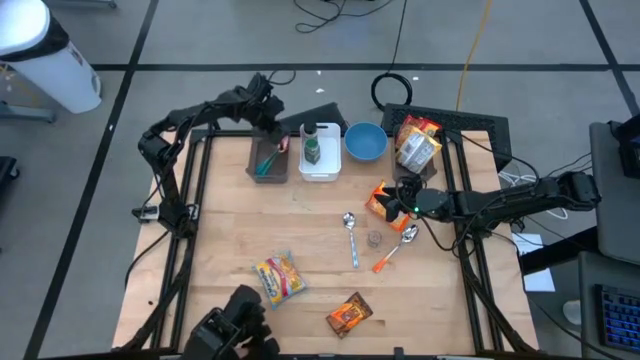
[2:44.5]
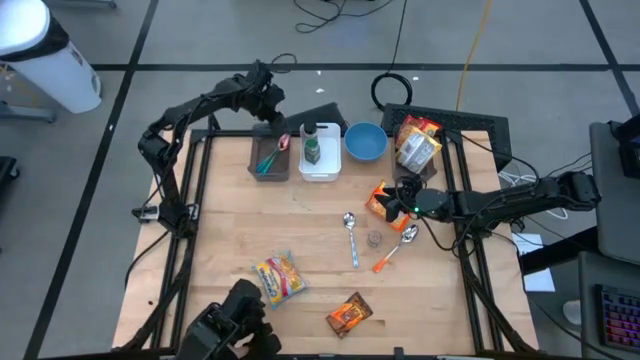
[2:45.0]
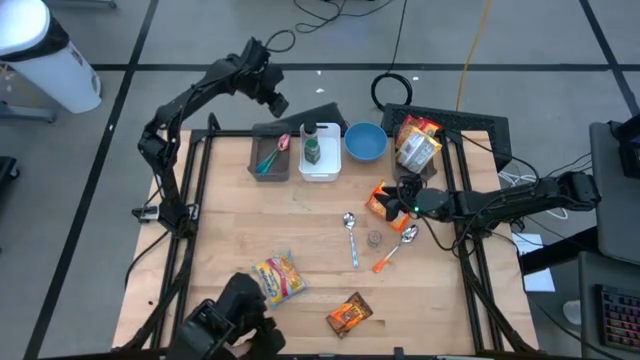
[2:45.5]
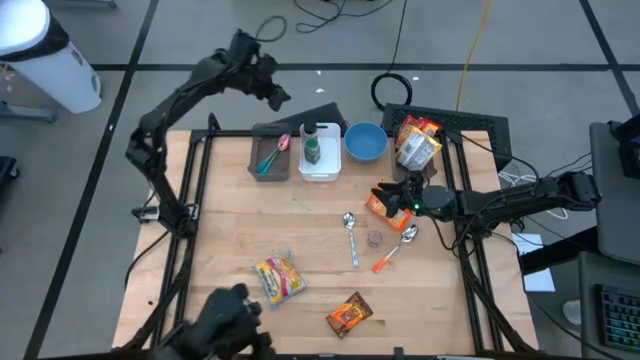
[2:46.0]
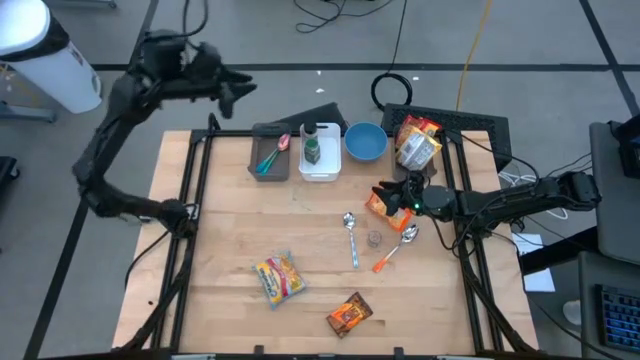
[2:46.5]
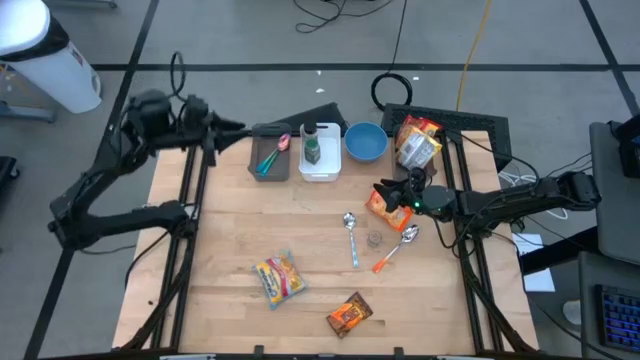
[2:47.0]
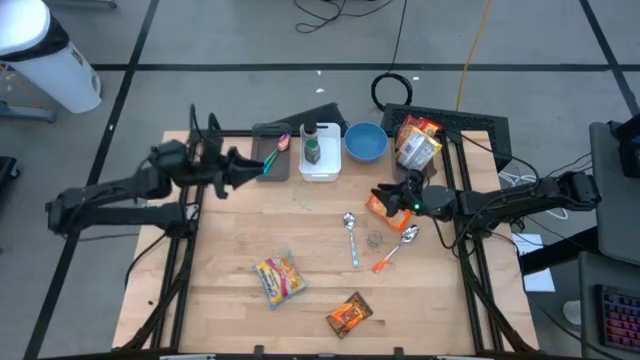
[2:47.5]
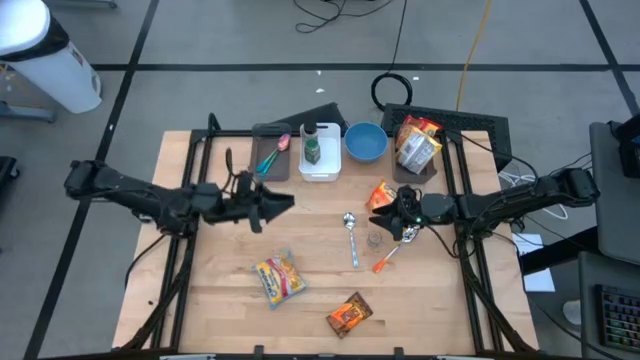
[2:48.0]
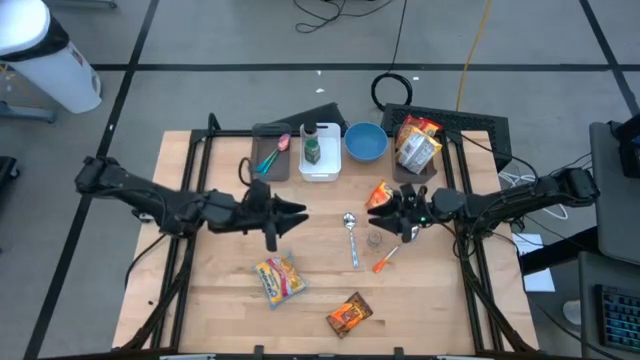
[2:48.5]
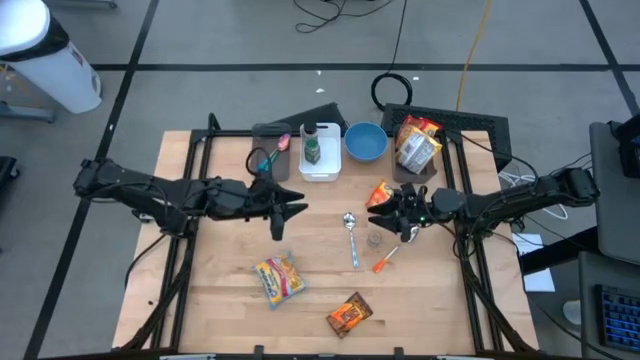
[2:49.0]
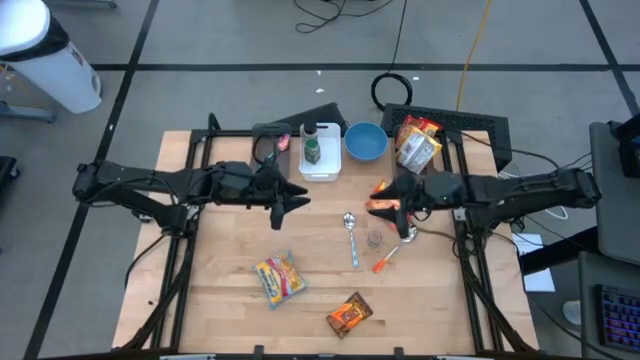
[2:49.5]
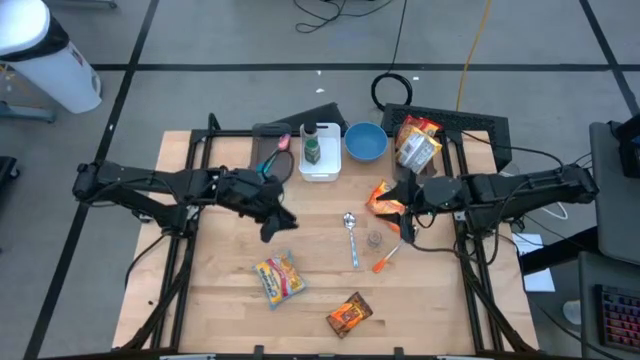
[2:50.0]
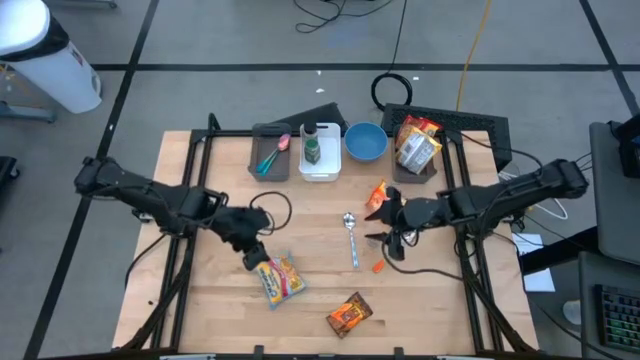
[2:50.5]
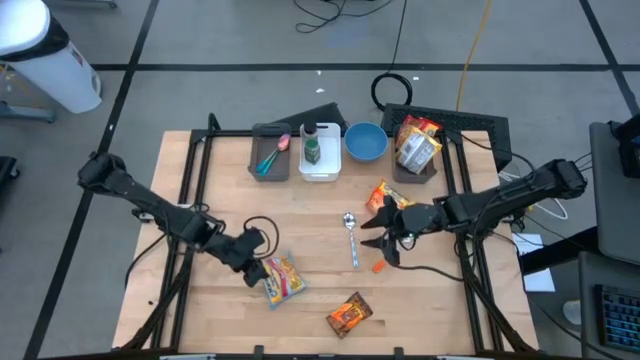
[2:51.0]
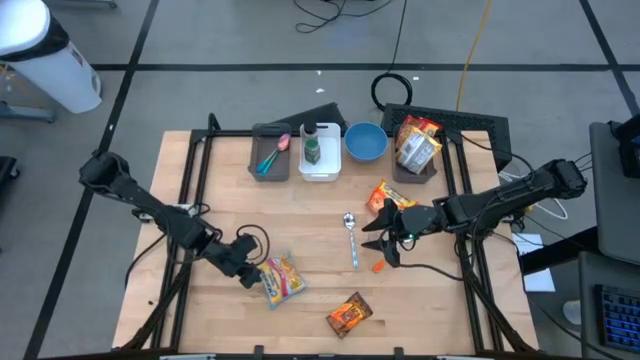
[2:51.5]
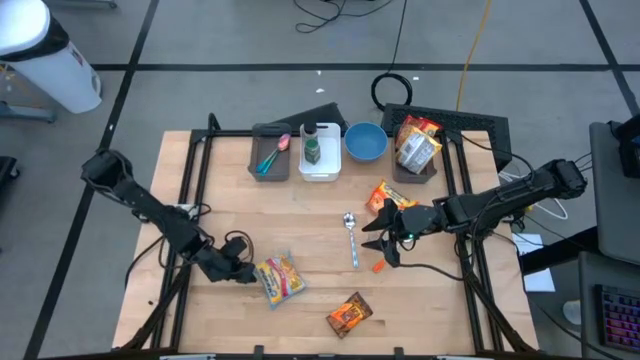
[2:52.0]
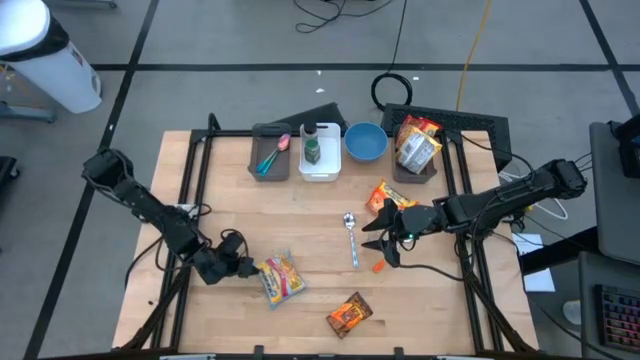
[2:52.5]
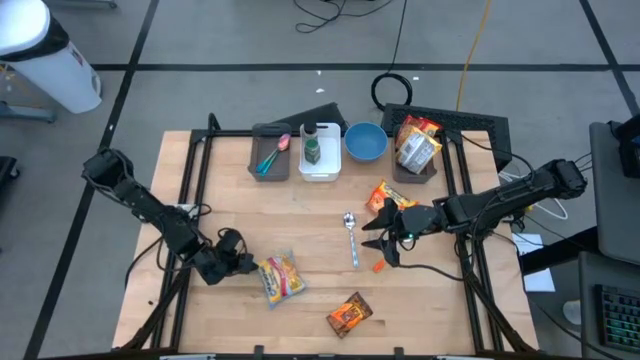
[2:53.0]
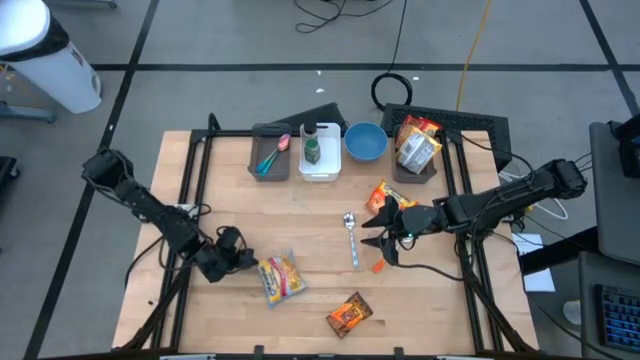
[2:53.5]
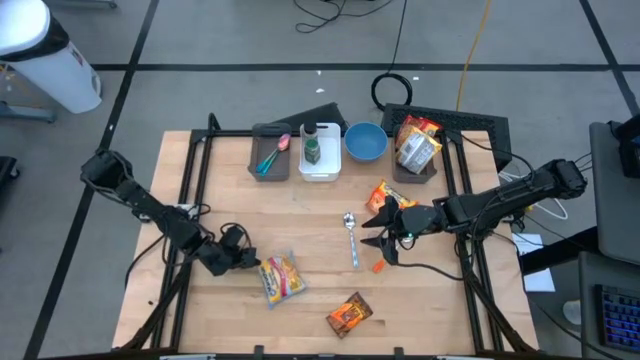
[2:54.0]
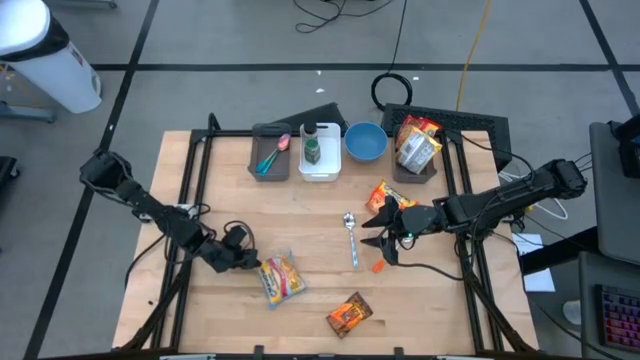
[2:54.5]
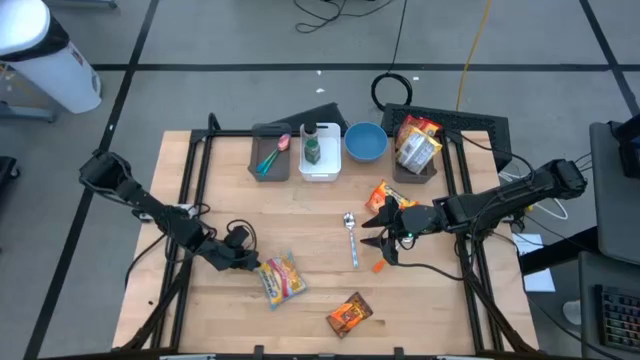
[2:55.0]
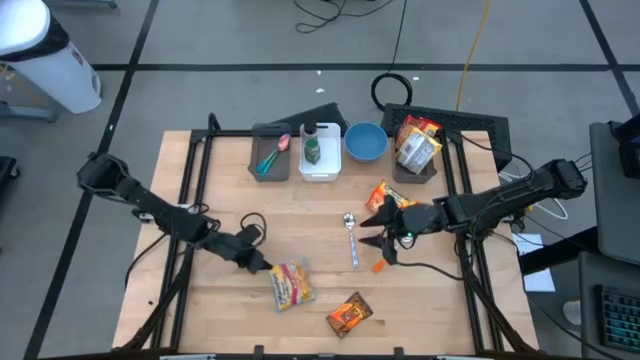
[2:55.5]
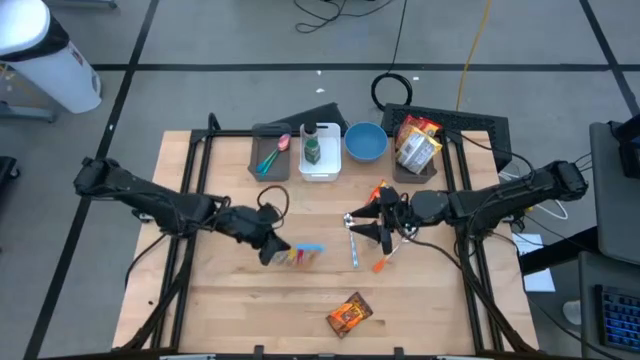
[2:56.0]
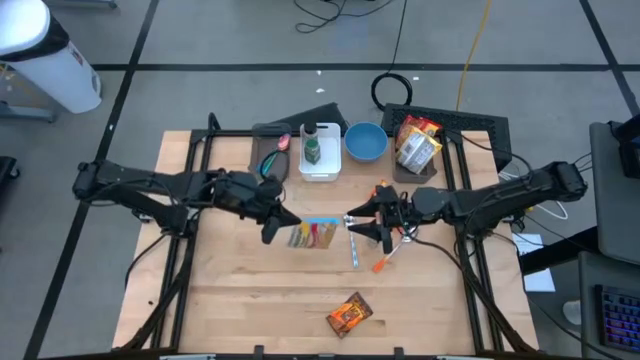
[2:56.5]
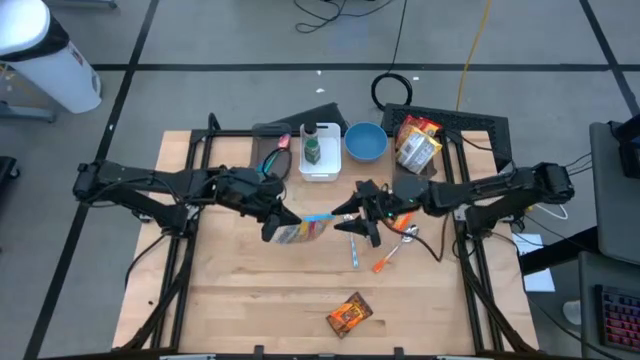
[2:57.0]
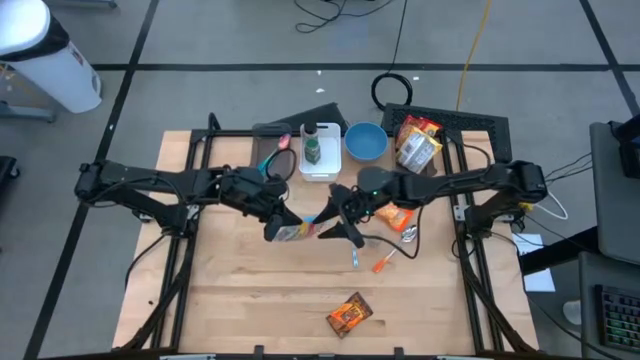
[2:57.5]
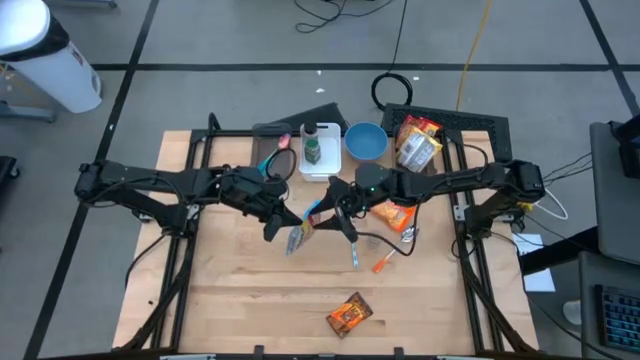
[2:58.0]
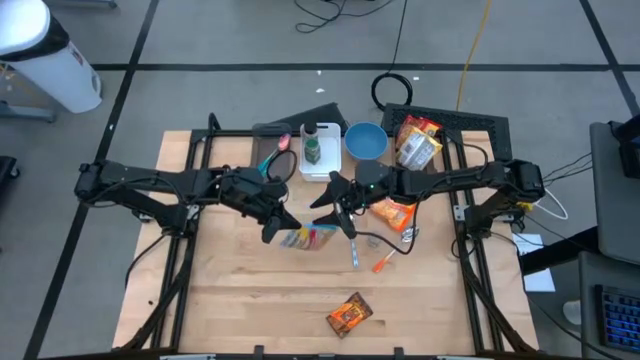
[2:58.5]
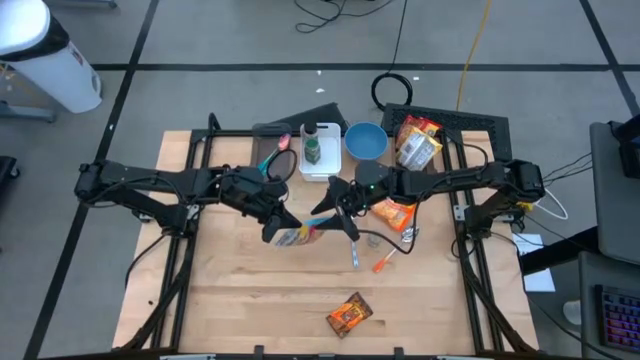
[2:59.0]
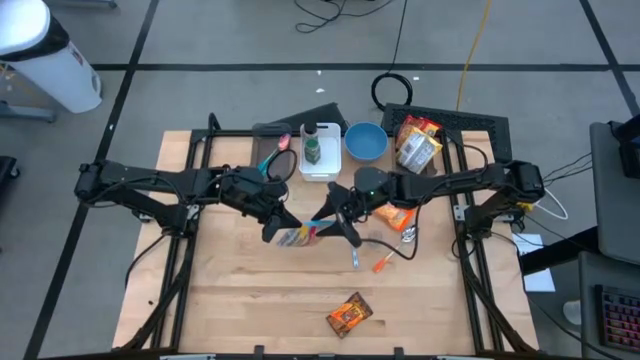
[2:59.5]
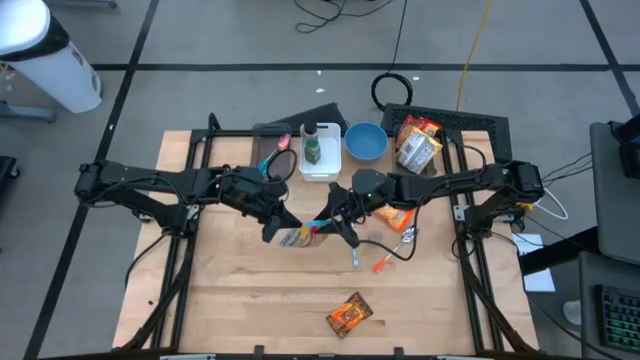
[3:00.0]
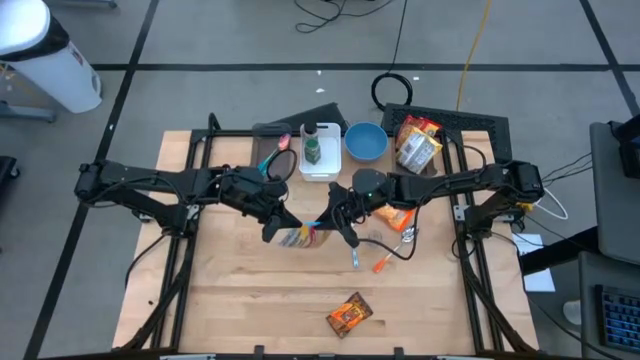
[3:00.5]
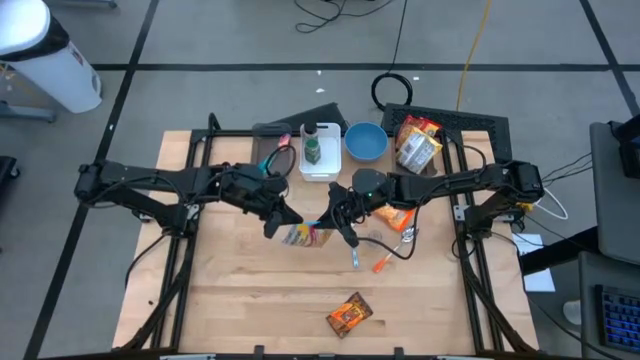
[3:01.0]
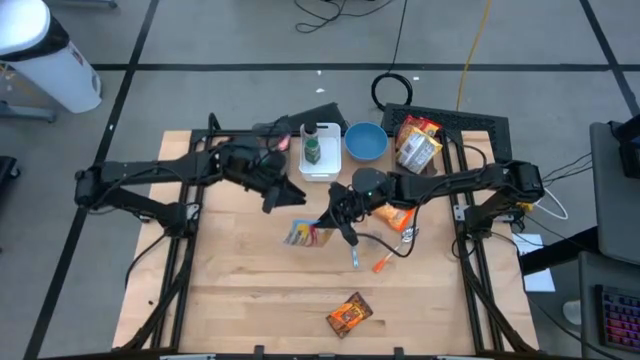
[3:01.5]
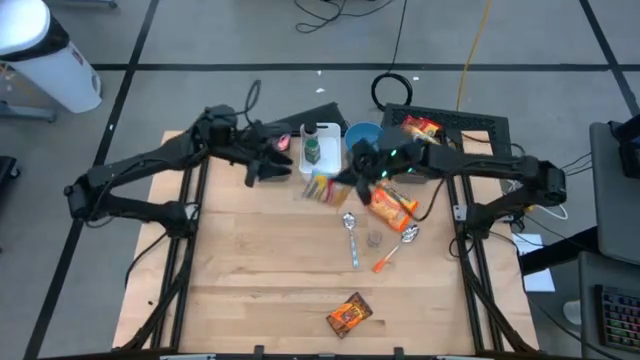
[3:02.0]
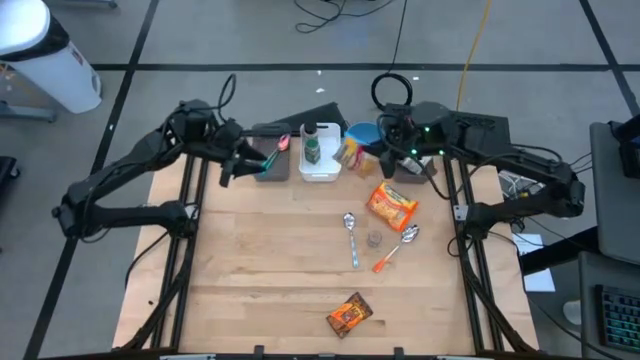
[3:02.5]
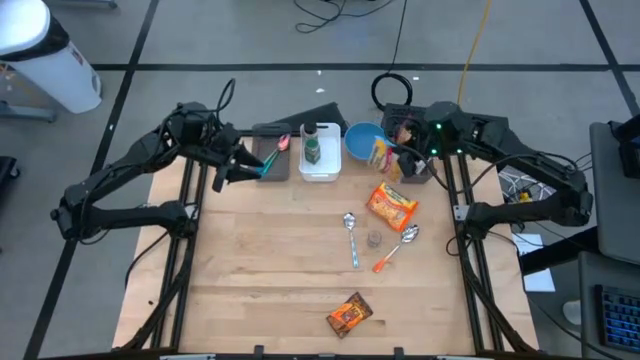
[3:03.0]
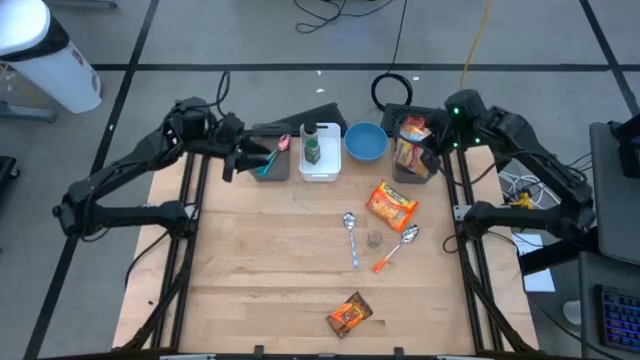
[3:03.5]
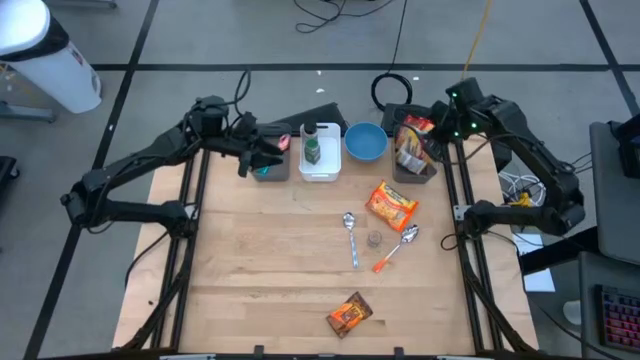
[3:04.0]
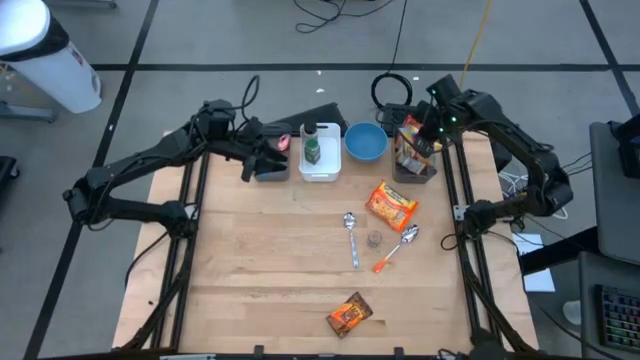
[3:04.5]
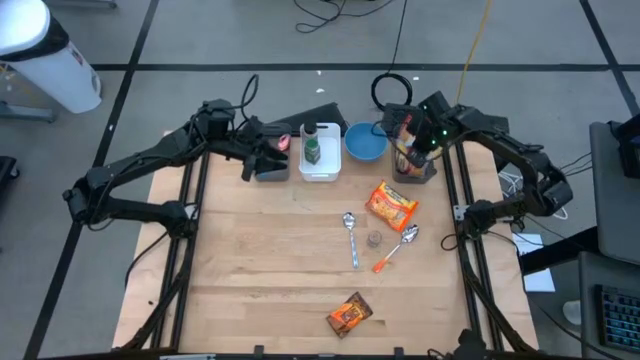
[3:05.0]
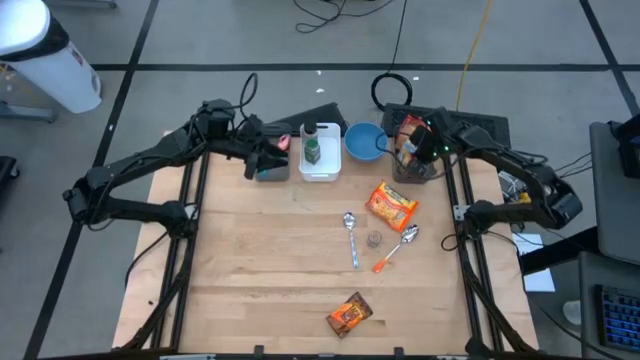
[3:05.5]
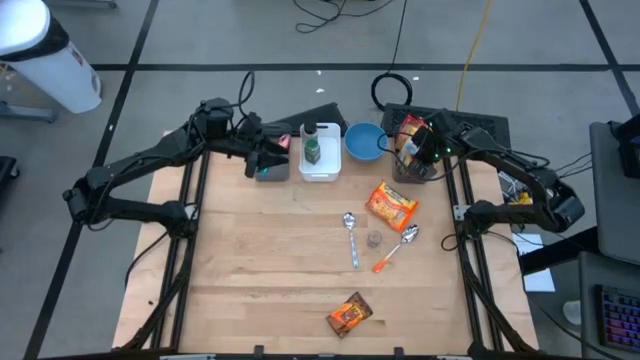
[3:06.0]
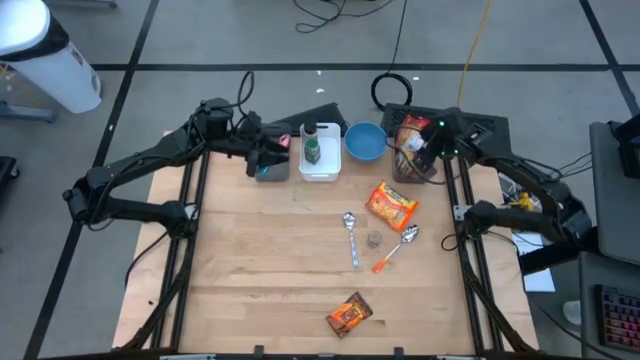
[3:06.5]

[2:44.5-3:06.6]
Task: Pick & Place Food Item
Put the light blue noodle pack into the right black bin
